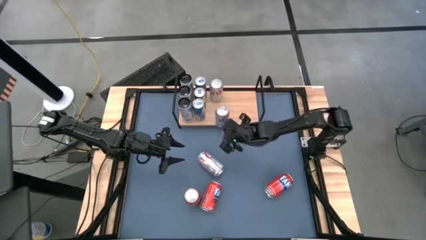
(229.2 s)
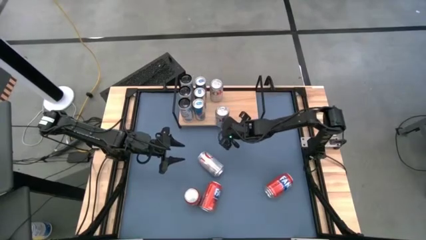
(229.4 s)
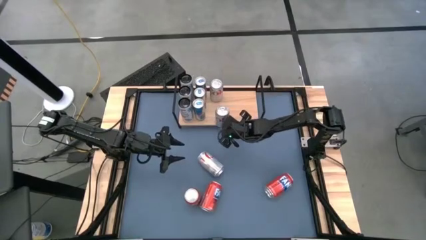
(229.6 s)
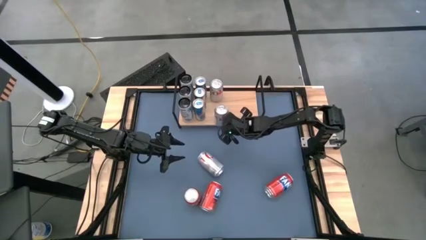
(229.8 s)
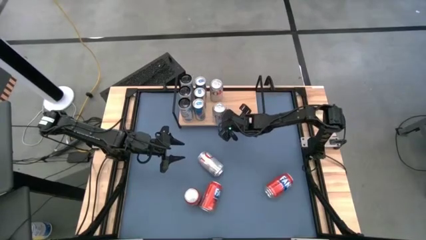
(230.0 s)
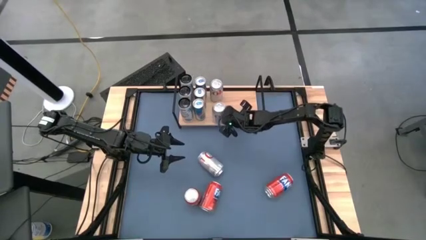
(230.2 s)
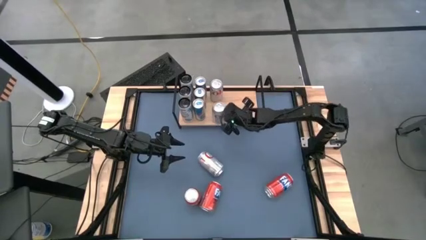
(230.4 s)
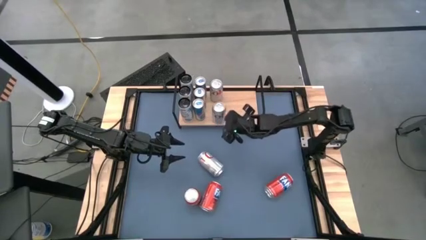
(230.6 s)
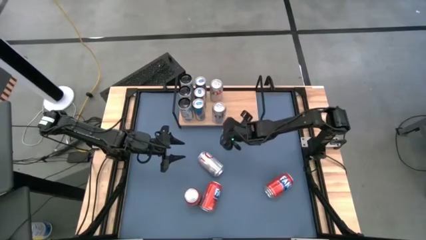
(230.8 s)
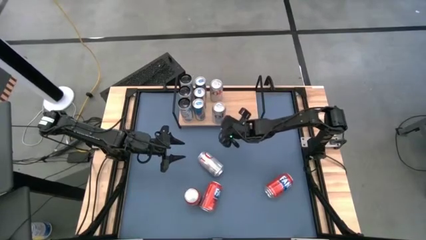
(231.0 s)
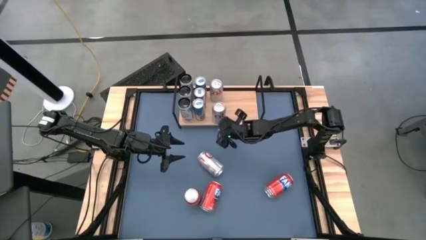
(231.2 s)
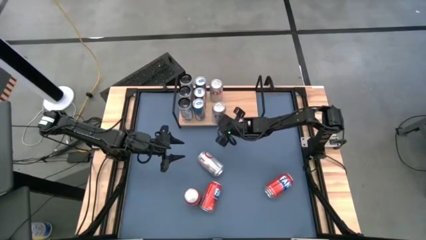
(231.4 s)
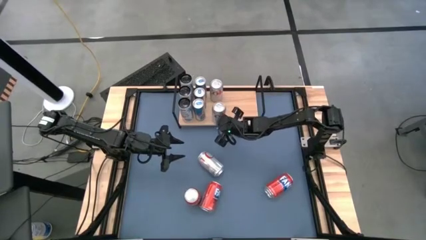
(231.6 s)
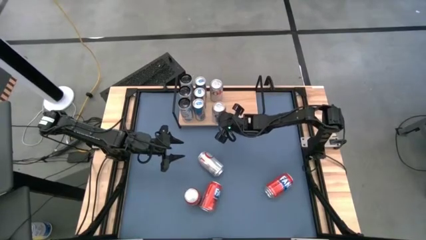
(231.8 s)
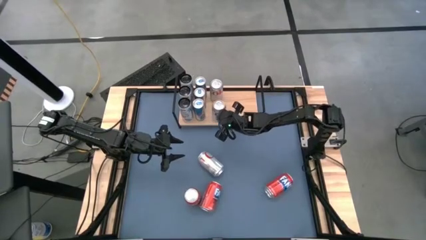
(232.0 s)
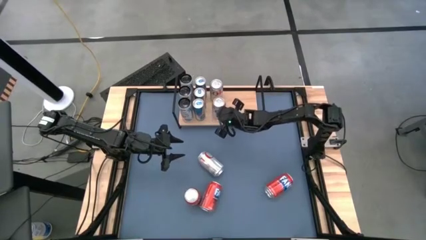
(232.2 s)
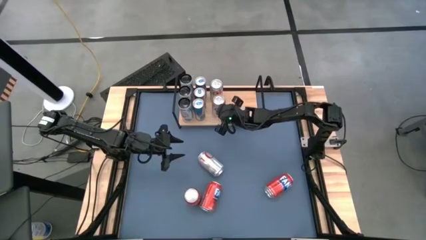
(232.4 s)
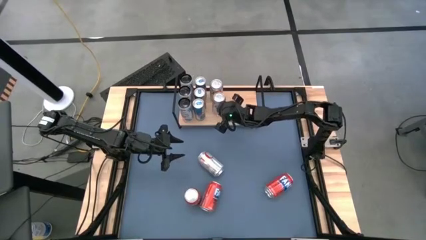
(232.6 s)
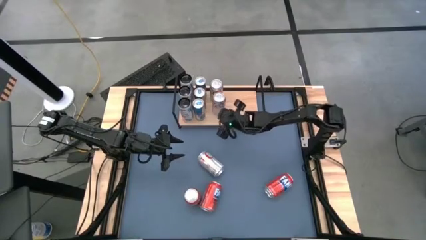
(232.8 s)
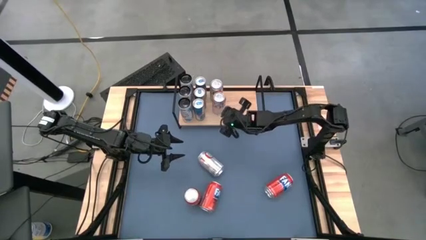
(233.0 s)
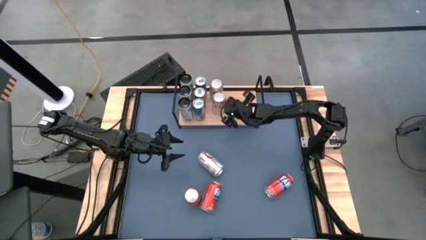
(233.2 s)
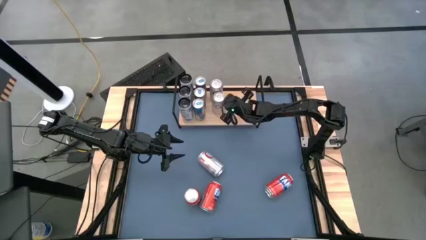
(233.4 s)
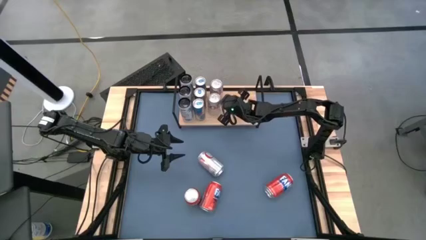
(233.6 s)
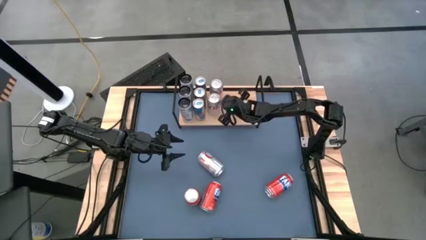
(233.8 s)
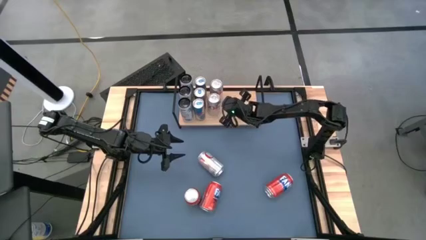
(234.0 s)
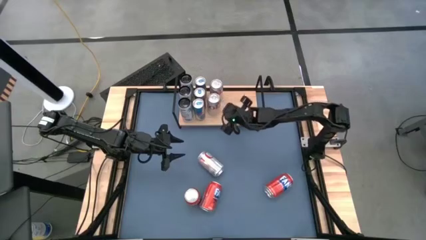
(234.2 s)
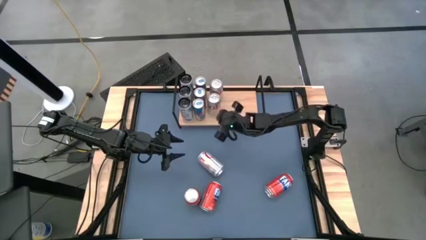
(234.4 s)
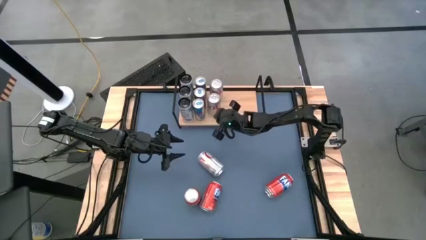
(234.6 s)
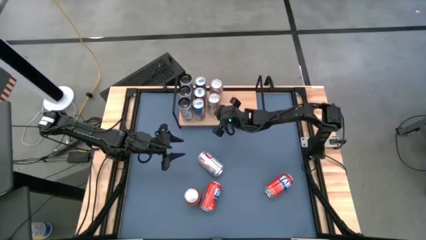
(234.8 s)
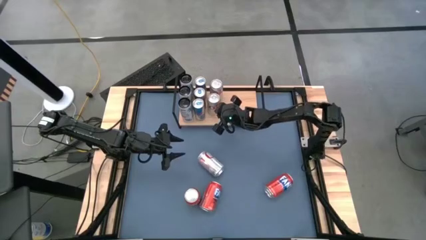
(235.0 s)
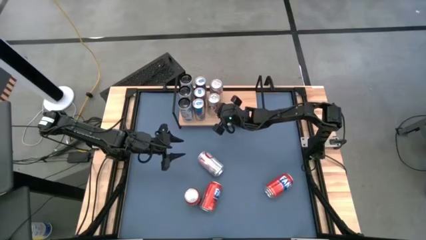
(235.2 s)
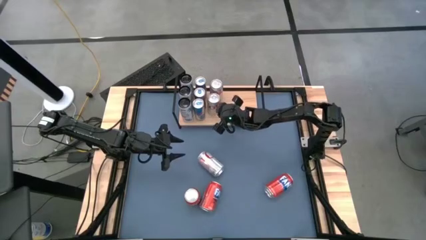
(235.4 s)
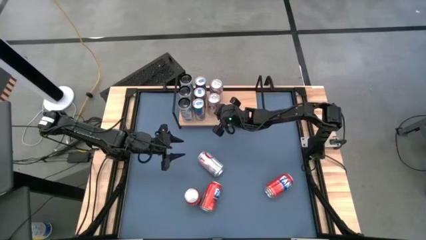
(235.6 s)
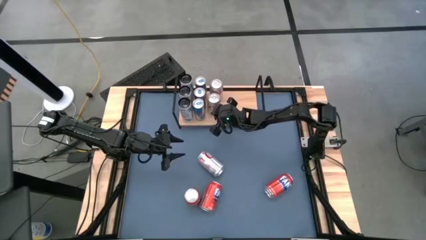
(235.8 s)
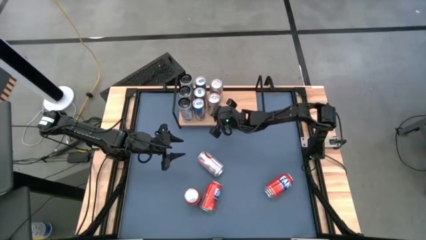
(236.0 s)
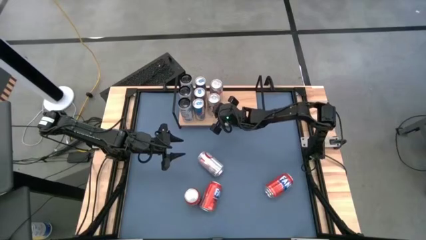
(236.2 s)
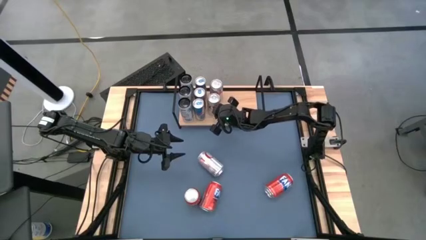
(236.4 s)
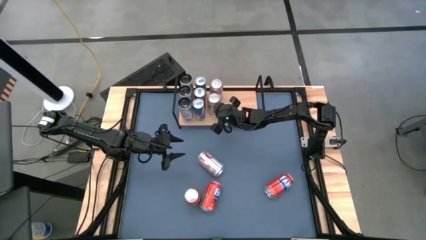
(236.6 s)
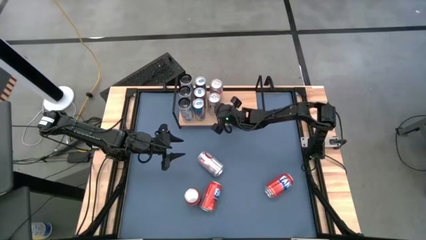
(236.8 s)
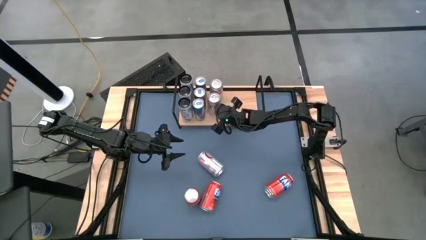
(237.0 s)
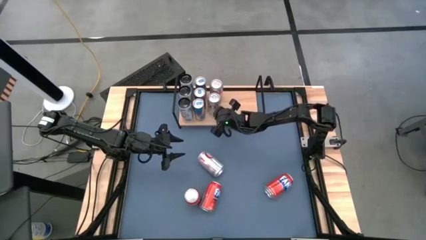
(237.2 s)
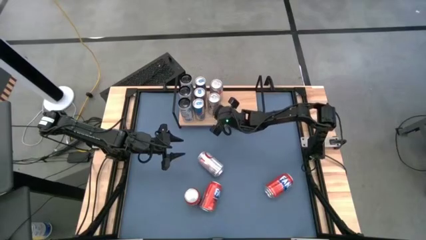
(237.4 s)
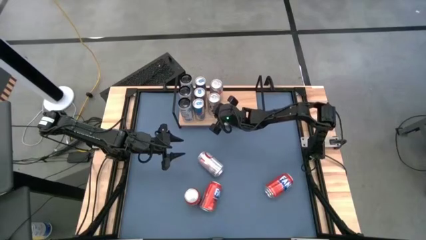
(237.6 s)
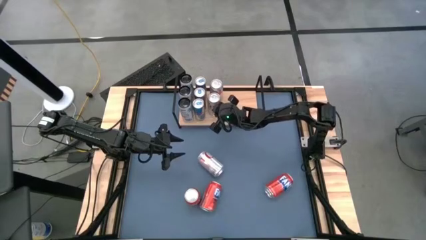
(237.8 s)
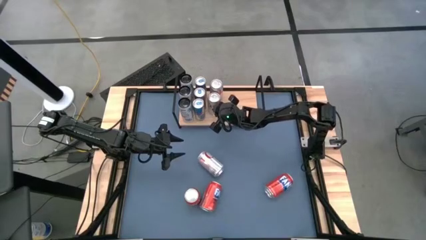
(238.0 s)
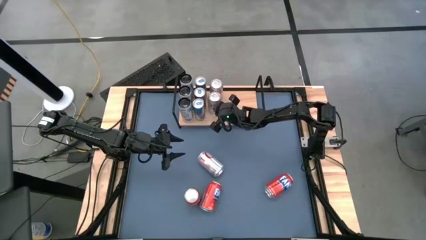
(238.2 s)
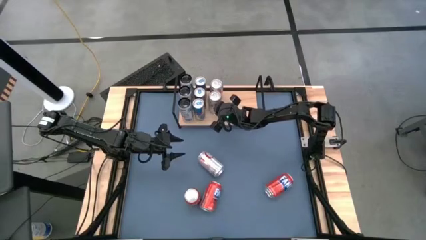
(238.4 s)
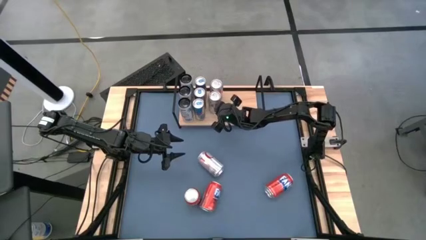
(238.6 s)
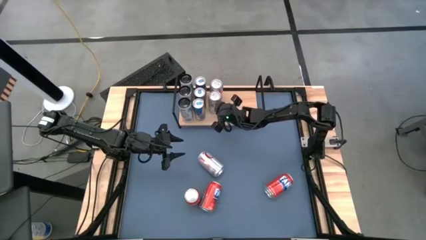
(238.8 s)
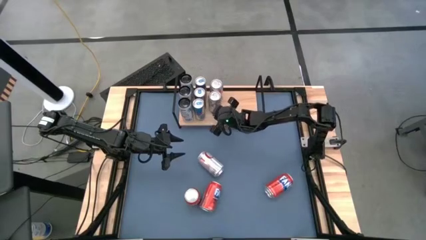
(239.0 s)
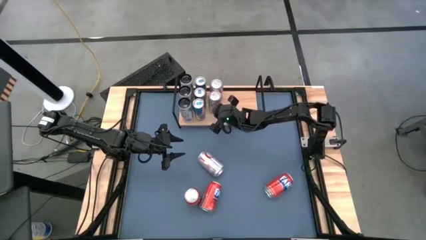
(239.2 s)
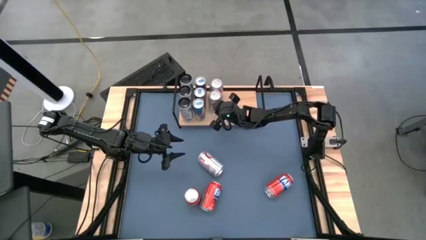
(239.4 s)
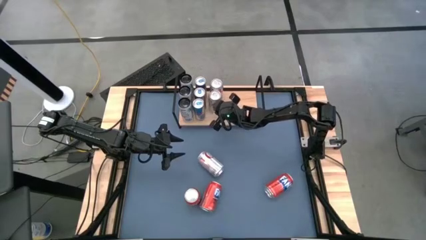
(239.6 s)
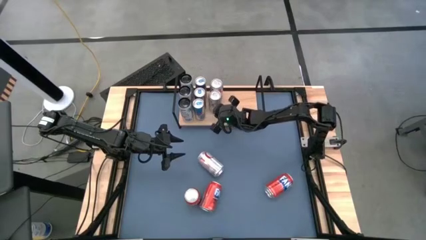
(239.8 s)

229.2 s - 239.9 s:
Task: Place canned beverage on shelf
Put the right silver soda can aligned with the other silver soda can on the shelf

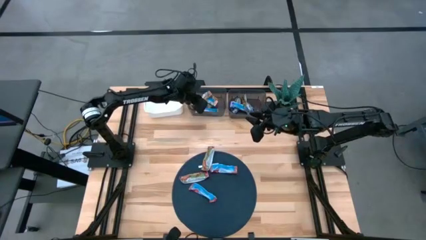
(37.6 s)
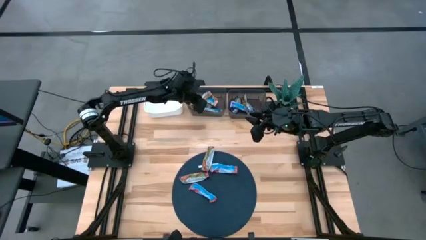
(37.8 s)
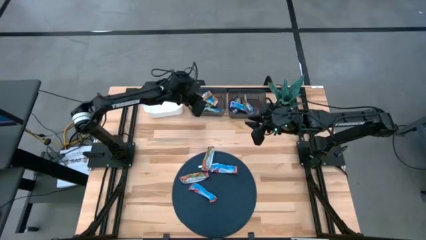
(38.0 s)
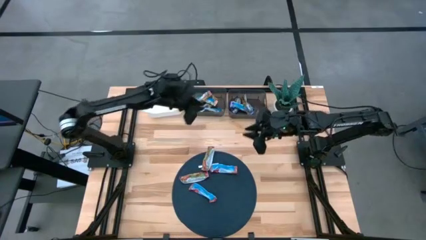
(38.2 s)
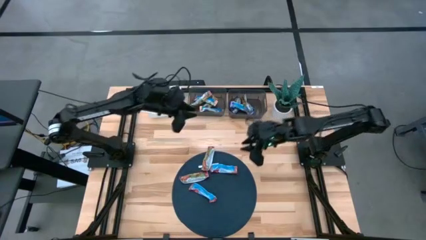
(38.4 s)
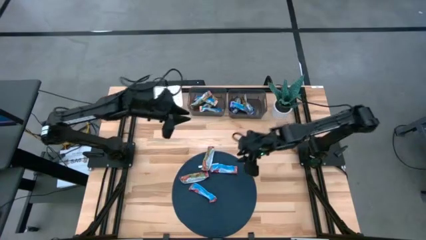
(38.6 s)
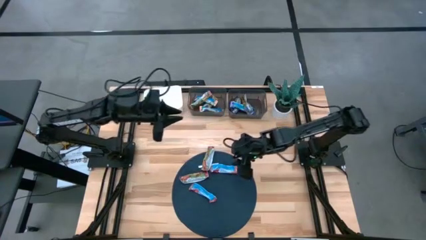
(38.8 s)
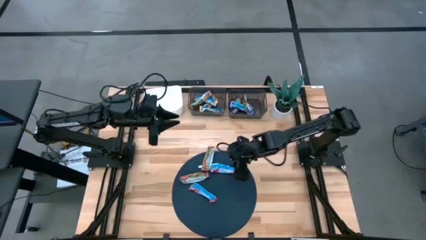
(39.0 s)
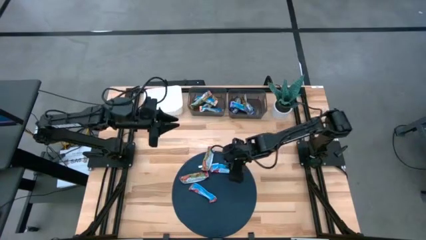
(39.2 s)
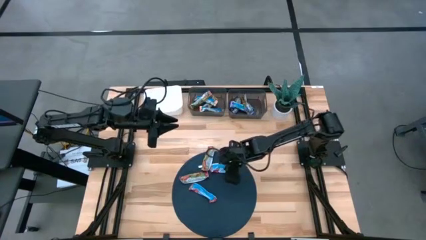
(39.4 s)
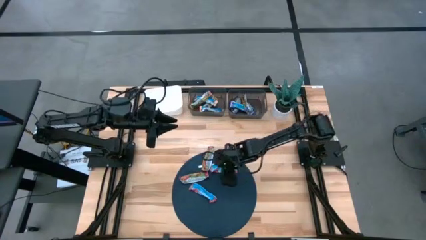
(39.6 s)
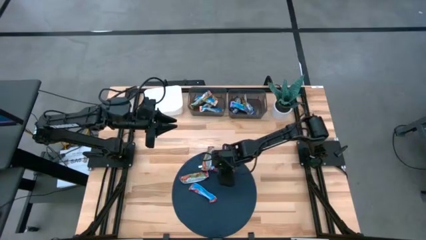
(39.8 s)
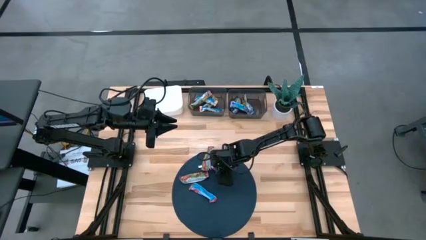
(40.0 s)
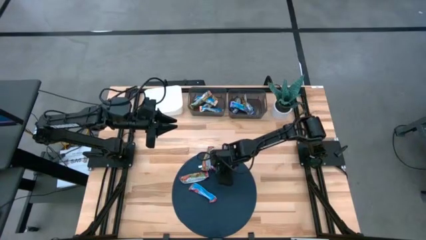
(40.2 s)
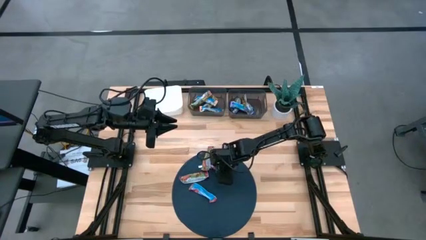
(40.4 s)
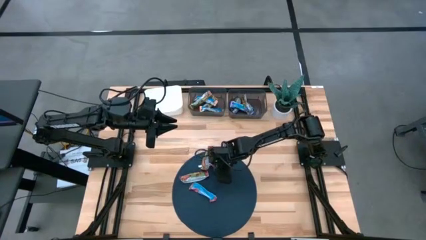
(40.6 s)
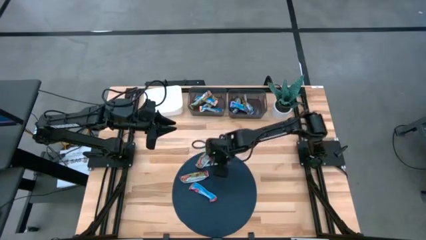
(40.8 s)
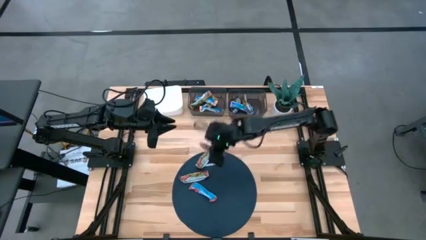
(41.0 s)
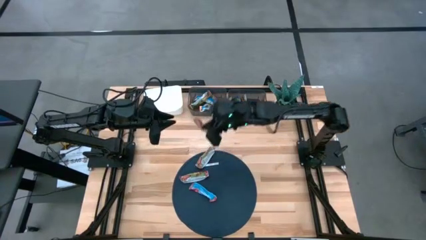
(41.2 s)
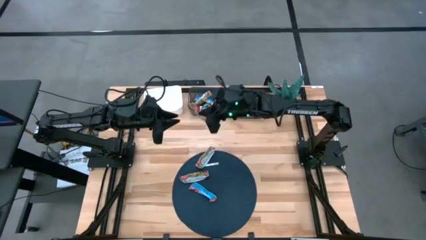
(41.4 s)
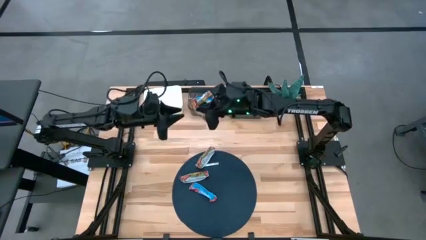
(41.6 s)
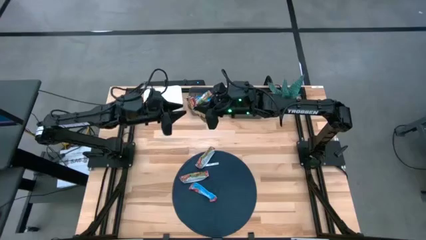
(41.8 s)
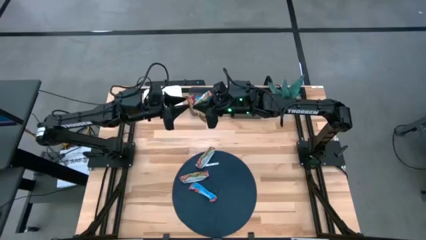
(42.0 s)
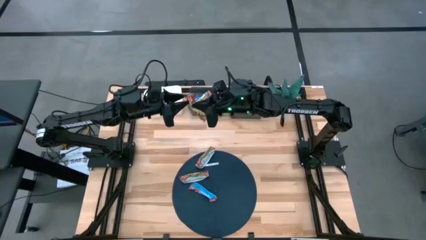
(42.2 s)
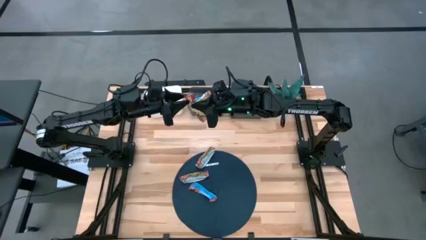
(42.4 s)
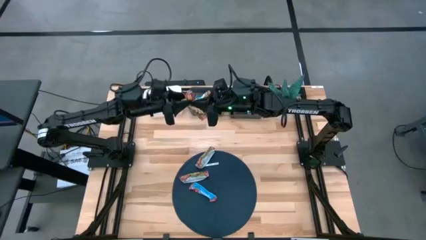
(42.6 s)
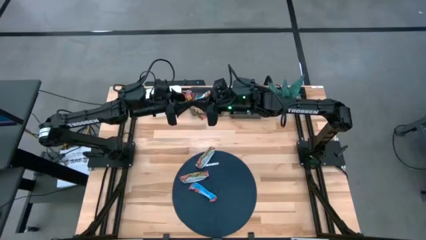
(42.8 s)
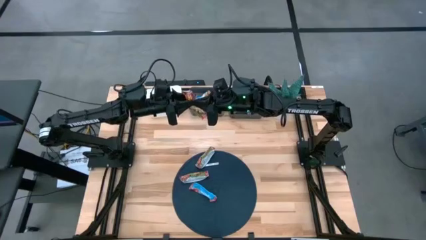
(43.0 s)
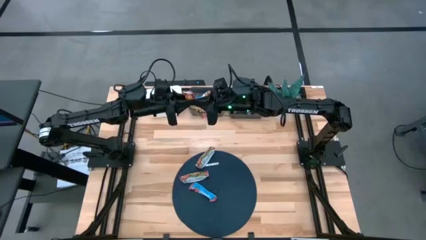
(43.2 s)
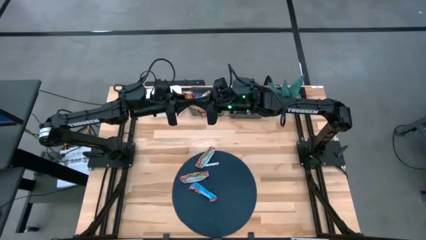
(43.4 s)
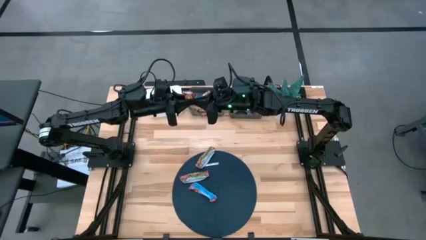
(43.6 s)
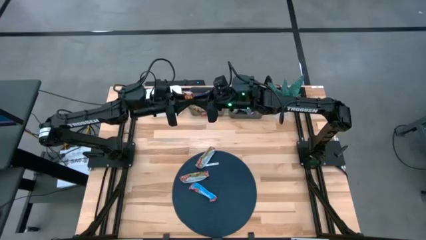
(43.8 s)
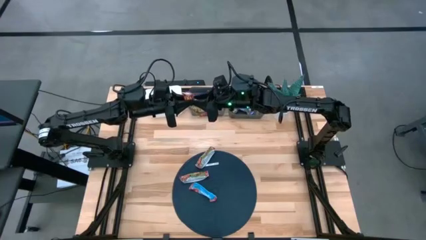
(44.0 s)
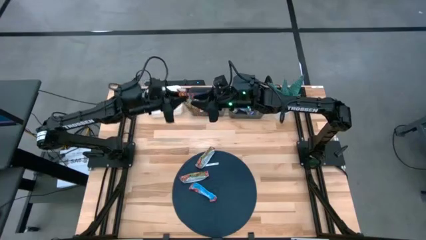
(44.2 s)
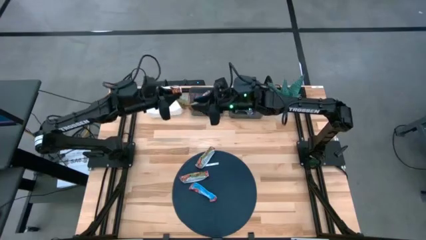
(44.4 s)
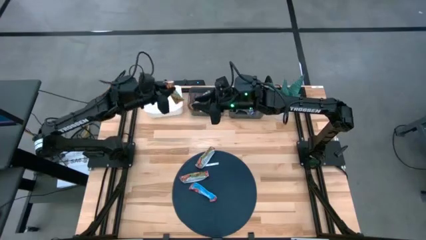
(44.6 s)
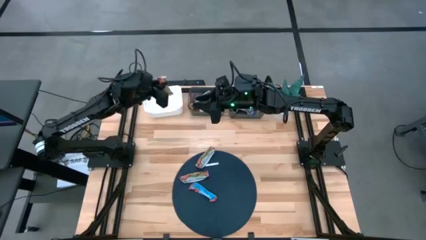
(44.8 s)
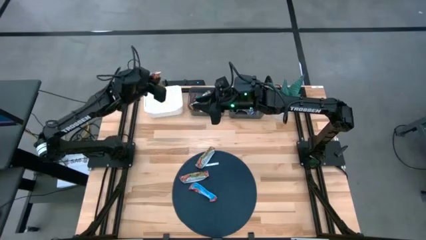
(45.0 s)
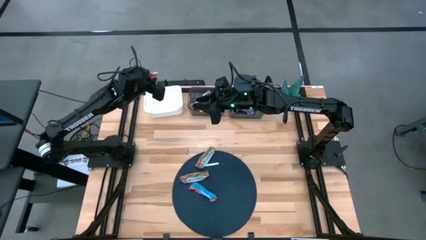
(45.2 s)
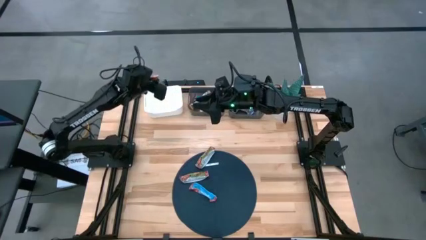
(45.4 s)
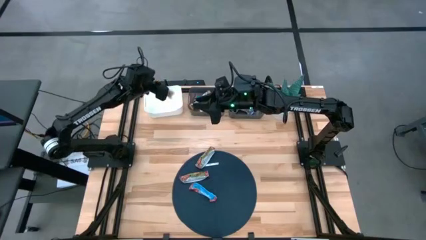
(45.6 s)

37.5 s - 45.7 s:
Task: Pick and place Granola Bars by type
Put the red granola bar into the white bin
